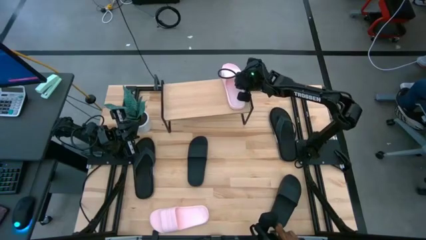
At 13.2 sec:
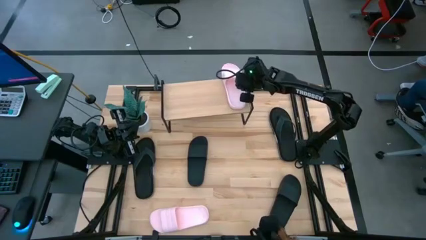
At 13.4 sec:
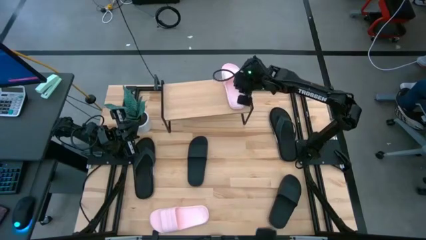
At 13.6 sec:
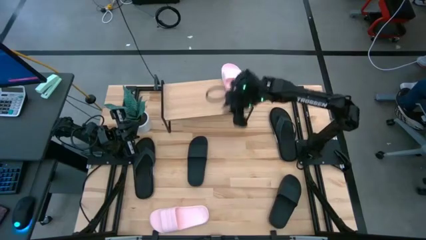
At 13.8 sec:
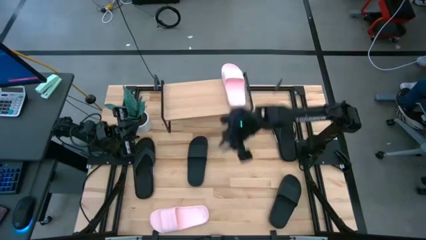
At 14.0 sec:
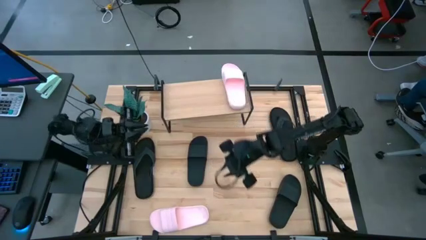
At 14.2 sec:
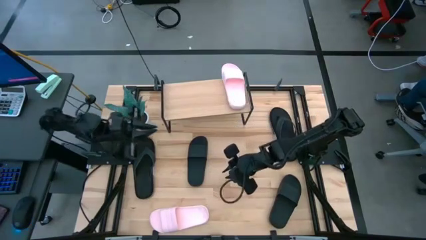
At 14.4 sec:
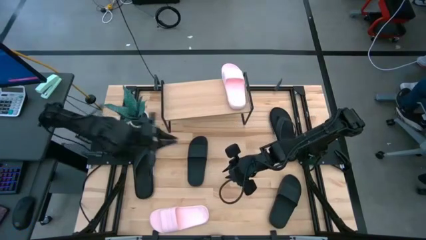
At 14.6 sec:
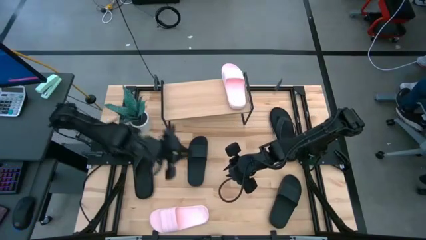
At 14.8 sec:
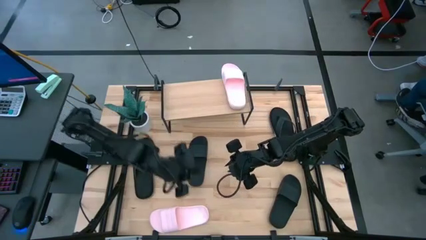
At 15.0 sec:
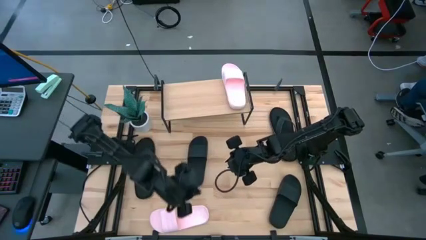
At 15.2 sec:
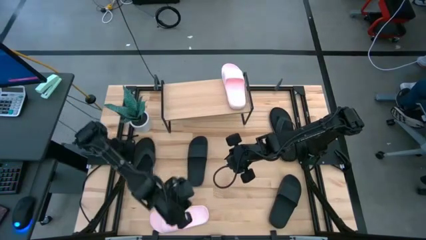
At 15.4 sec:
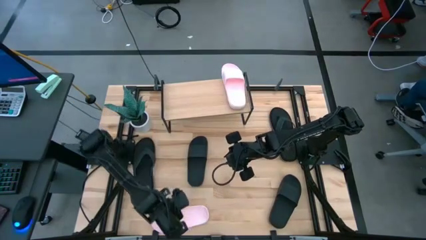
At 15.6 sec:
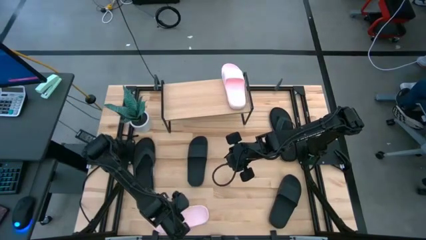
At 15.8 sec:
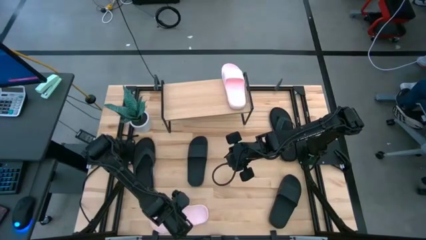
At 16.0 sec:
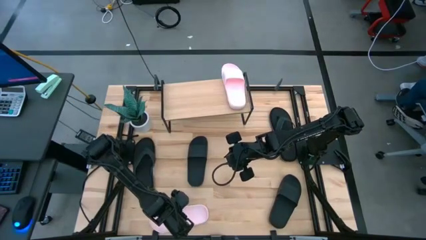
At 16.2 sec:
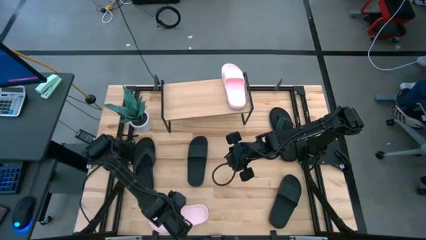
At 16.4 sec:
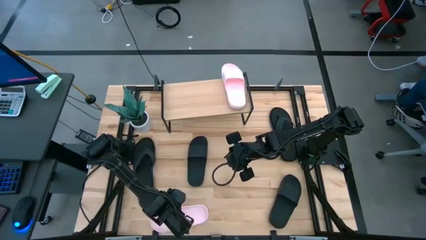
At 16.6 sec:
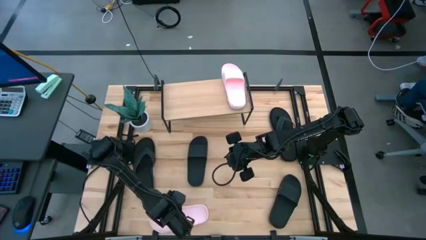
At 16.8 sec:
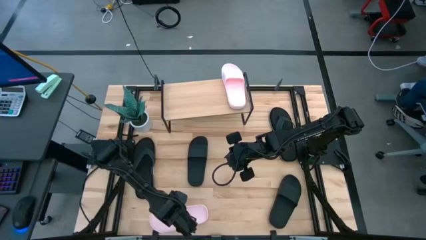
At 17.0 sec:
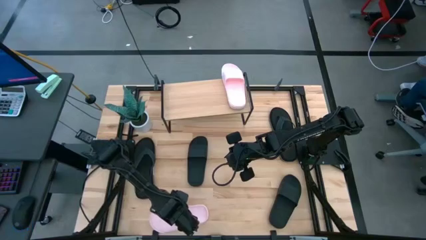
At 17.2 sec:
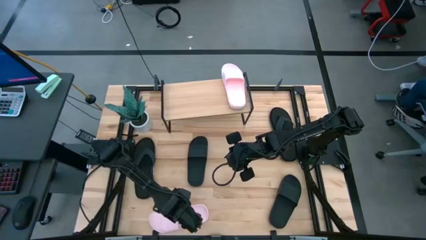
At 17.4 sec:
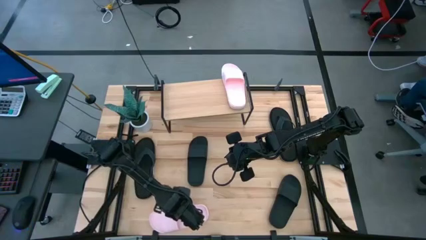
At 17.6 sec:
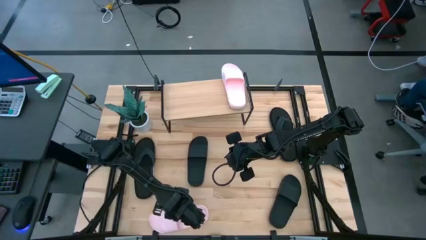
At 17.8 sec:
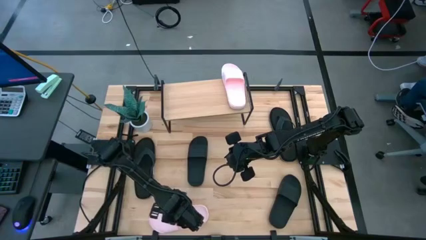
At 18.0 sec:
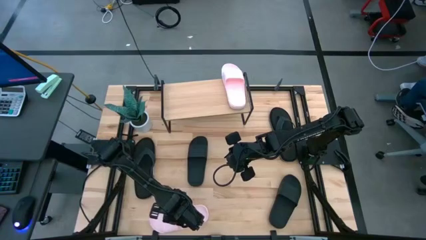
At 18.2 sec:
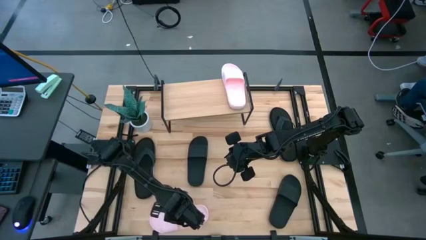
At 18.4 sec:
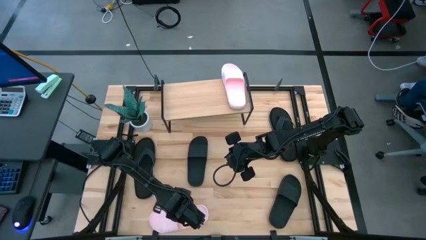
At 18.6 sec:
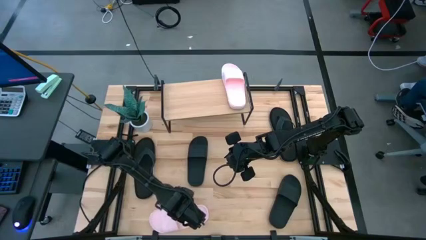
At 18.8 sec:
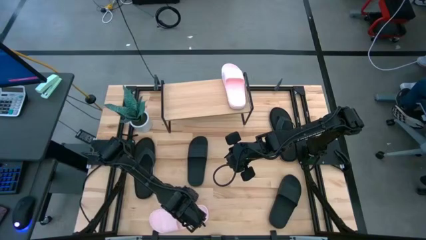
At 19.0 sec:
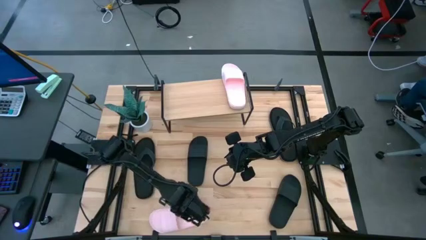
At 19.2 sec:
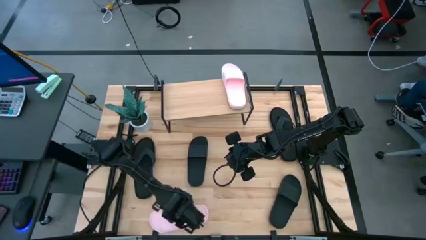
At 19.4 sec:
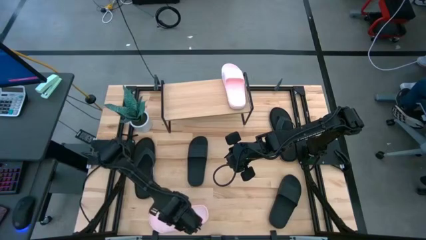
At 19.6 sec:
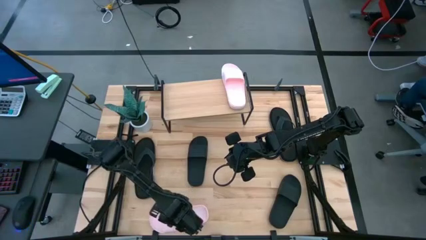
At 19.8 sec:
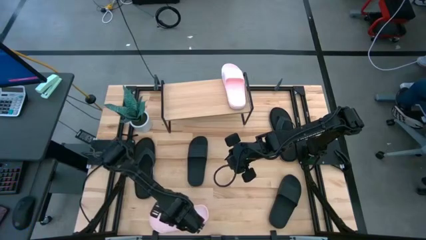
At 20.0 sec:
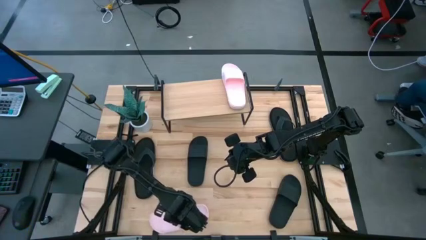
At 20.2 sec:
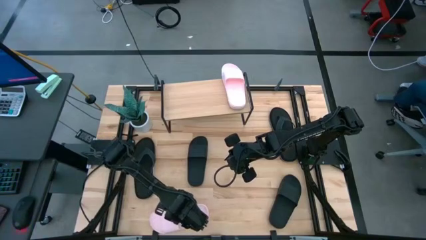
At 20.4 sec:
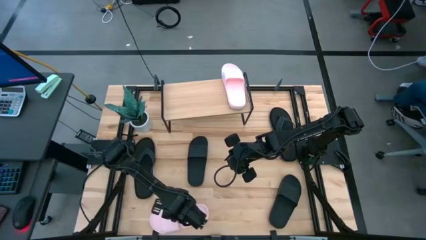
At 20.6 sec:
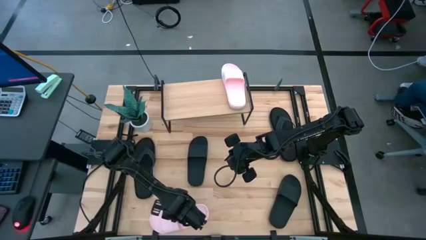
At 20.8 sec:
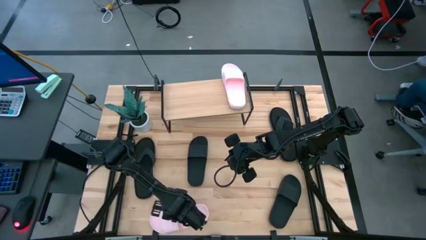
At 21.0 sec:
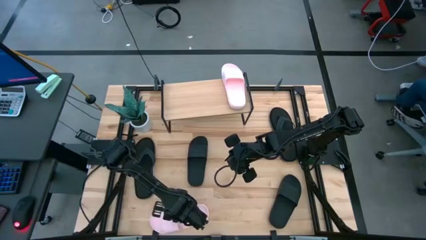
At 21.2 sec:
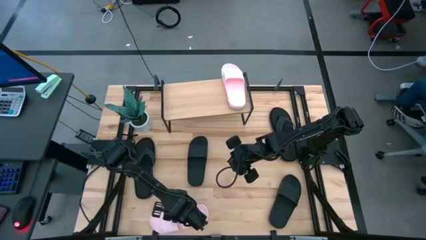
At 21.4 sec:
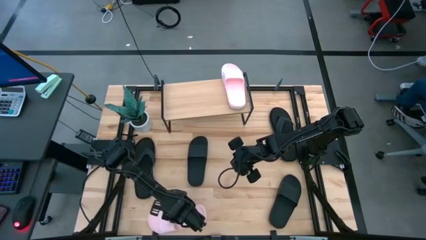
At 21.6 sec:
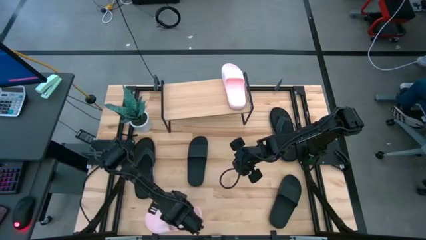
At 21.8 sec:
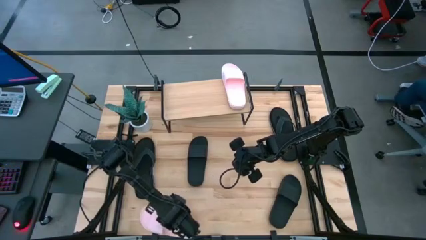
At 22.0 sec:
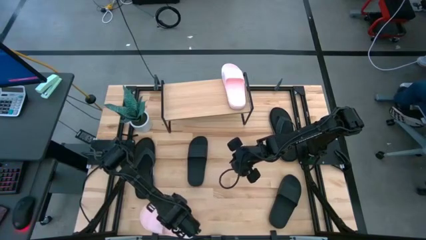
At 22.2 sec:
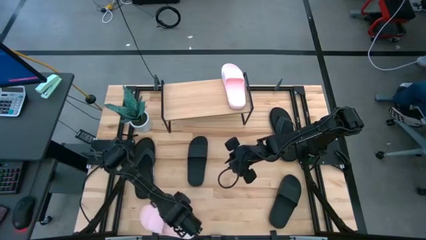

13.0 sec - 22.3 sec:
Task: Pick and place slides into the shelf
Put the pink slide on the shelf

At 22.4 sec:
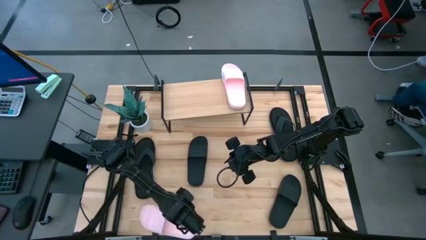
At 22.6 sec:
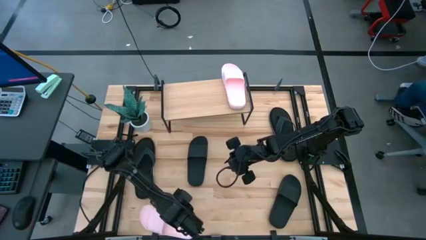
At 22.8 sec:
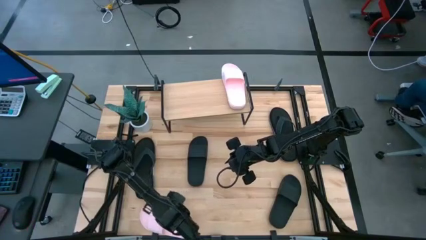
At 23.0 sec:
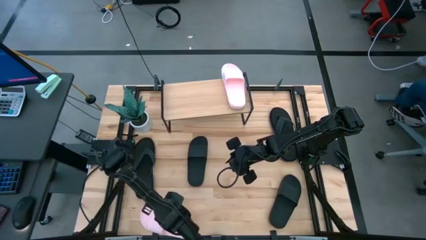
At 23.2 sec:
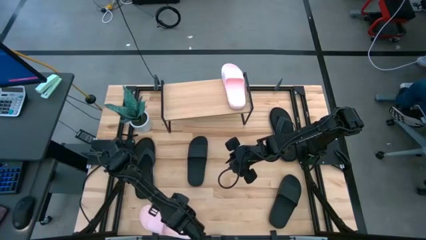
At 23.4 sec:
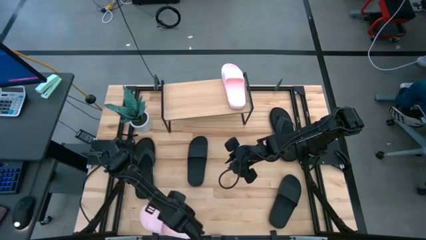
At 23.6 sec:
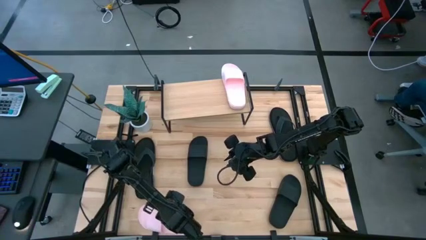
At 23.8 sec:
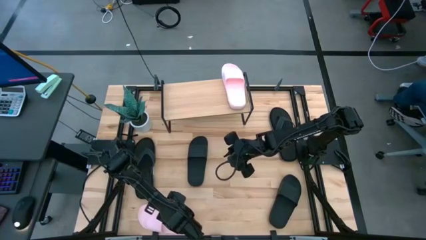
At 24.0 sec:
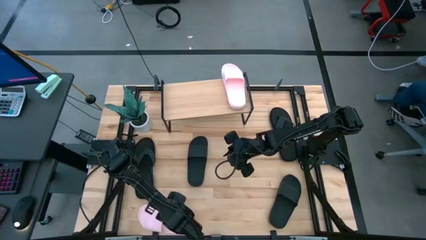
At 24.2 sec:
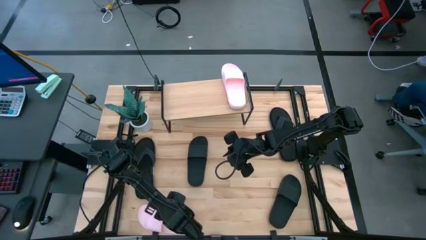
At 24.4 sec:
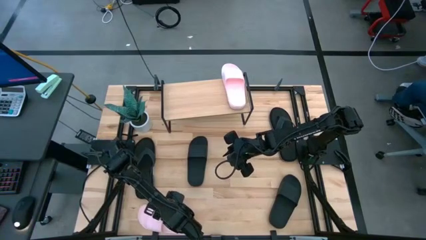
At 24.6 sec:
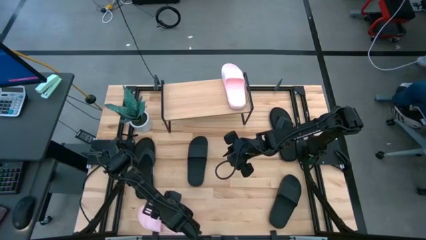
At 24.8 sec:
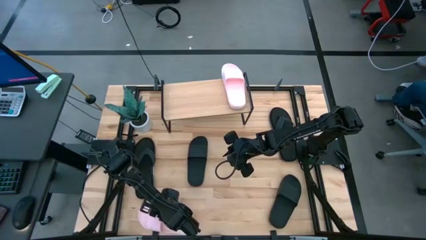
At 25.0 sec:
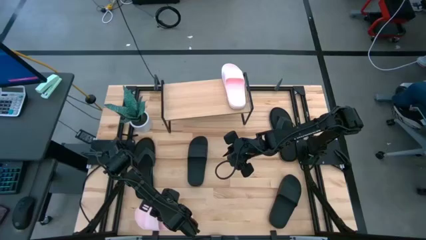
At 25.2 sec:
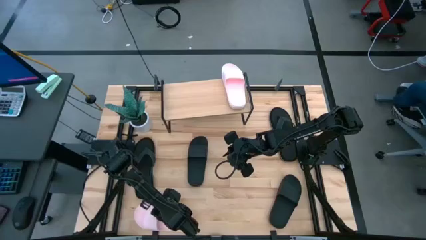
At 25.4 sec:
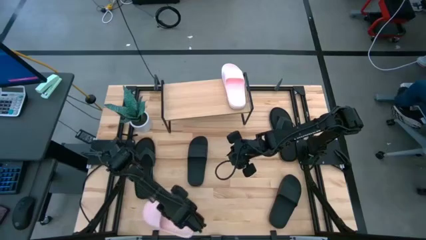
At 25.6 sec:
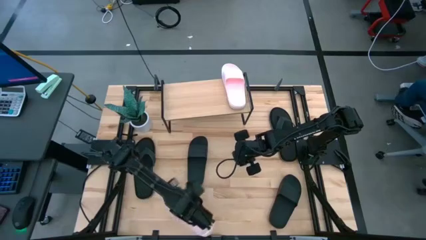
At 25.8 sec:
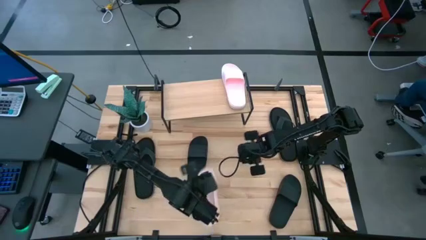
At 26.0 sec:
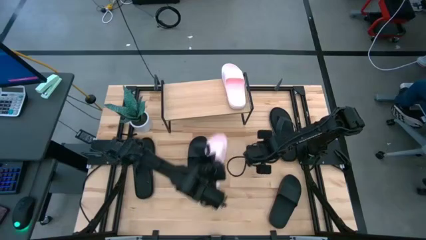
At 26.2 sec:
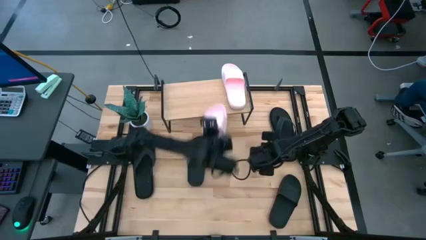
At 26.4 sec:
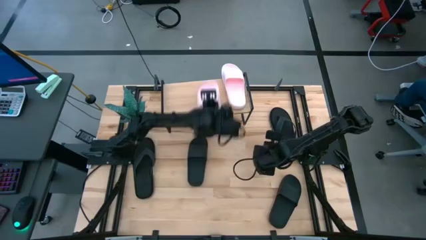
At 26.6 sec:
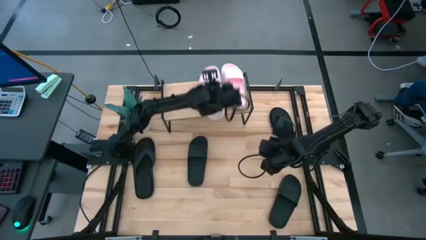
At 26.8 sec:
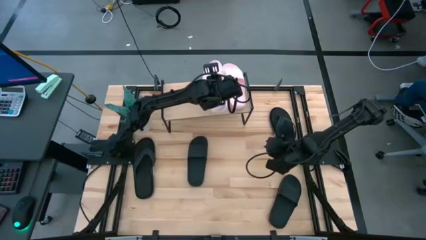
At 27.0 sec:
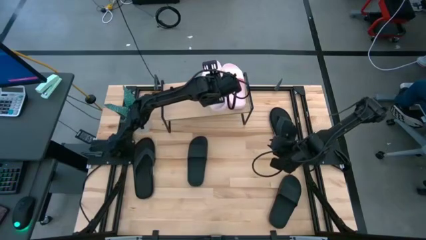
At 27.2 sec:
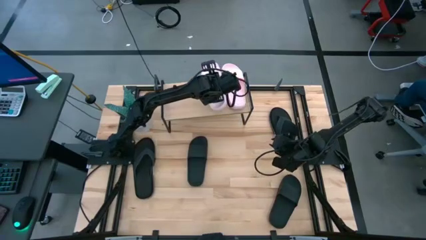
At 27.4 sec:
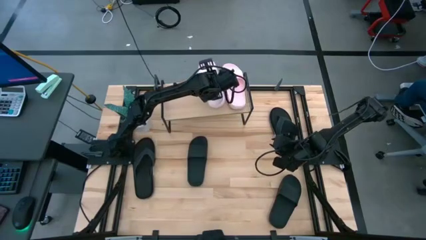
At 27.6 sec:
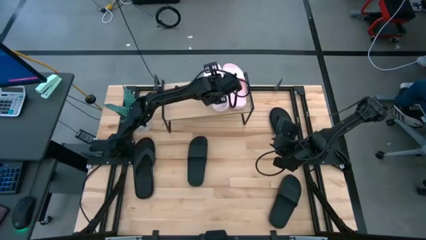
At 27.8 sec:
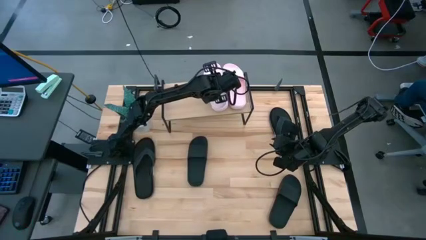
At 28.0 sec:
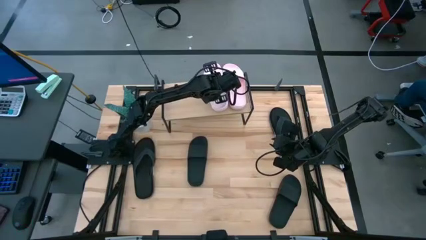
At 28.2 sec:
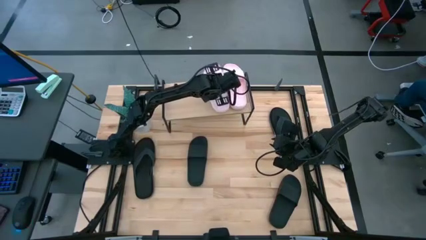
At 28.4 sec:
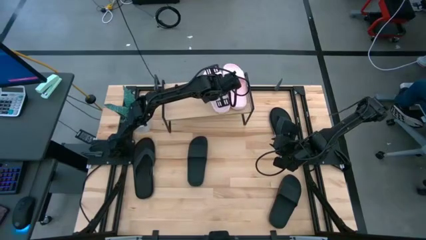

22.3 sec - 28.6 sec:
Put the pink slide on the shelf
